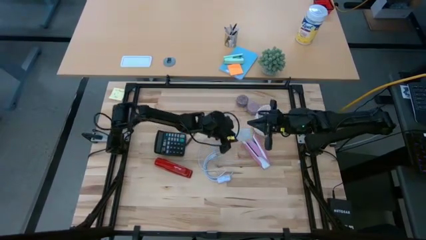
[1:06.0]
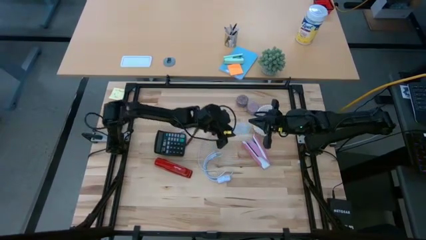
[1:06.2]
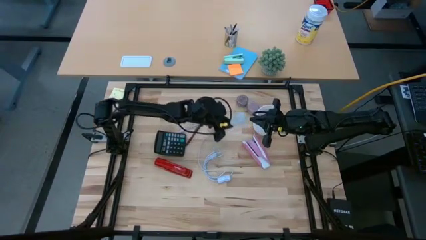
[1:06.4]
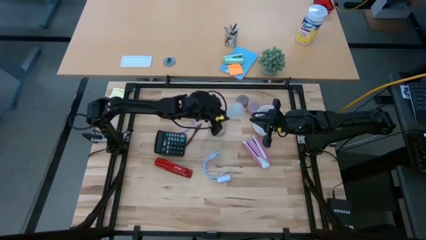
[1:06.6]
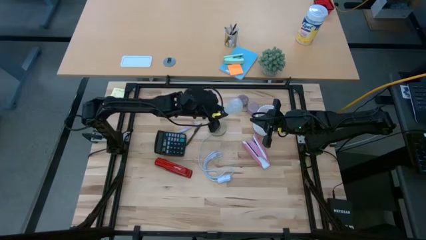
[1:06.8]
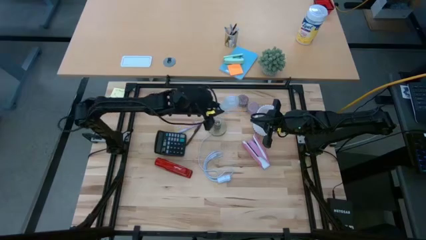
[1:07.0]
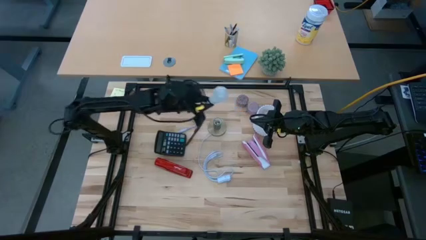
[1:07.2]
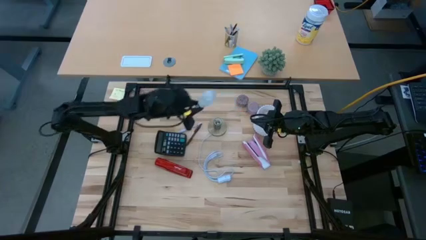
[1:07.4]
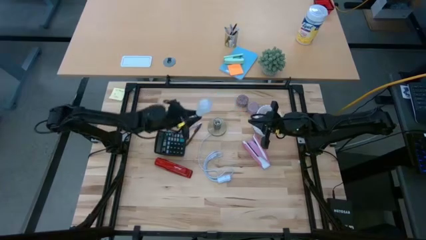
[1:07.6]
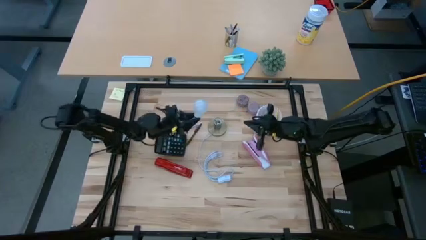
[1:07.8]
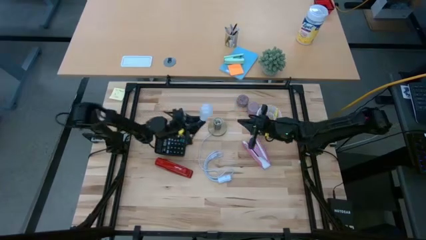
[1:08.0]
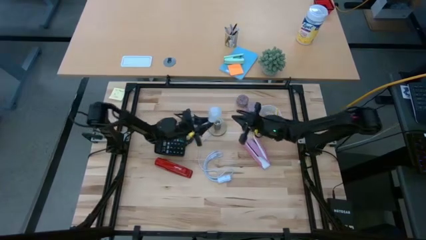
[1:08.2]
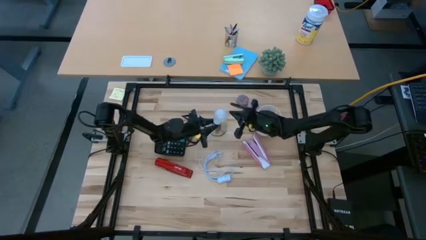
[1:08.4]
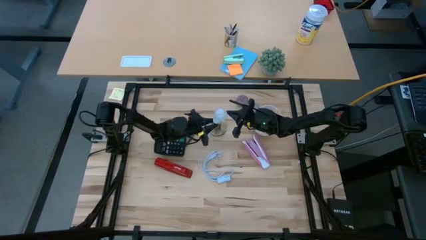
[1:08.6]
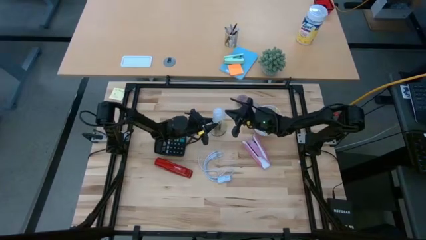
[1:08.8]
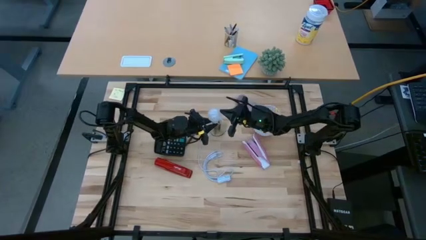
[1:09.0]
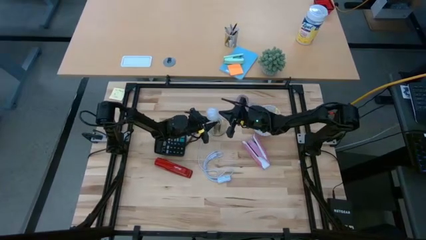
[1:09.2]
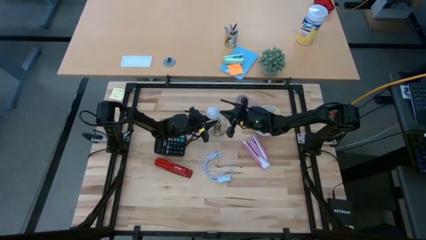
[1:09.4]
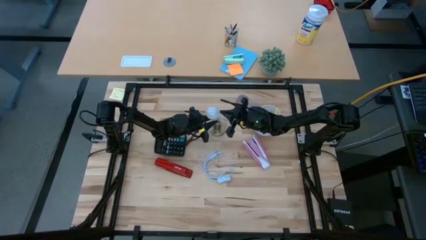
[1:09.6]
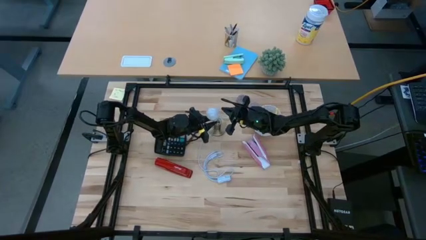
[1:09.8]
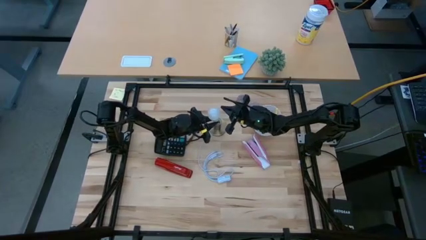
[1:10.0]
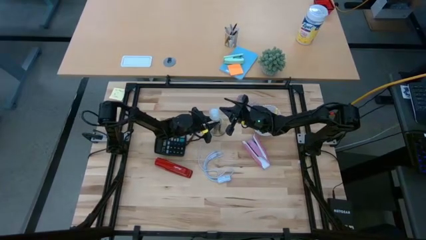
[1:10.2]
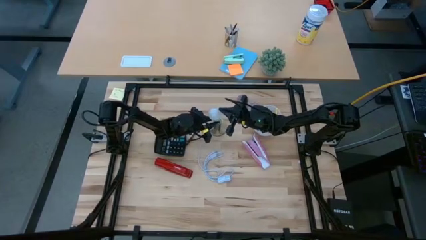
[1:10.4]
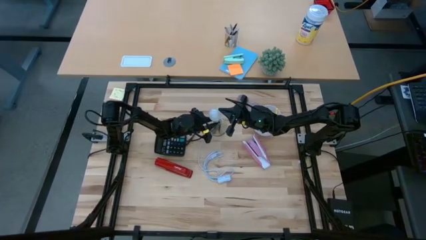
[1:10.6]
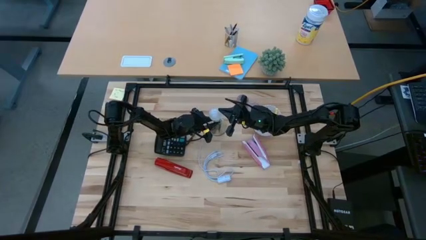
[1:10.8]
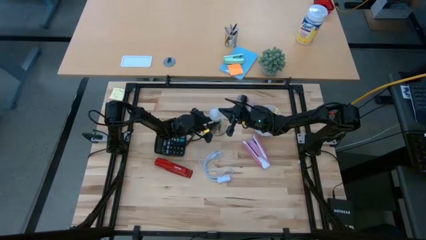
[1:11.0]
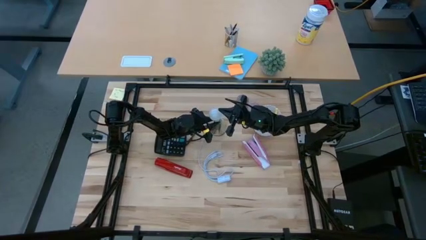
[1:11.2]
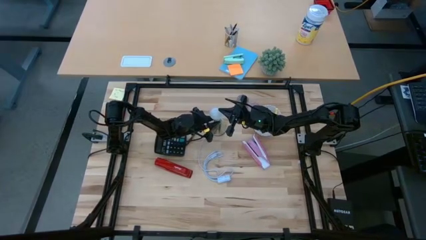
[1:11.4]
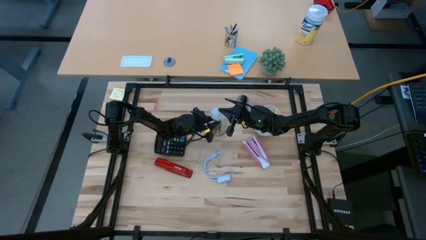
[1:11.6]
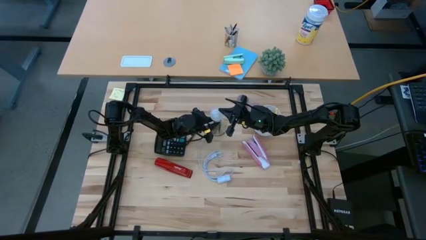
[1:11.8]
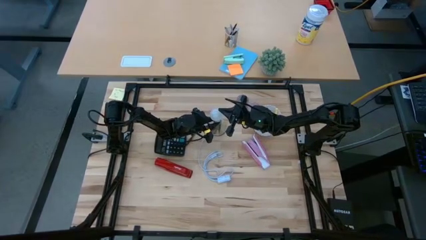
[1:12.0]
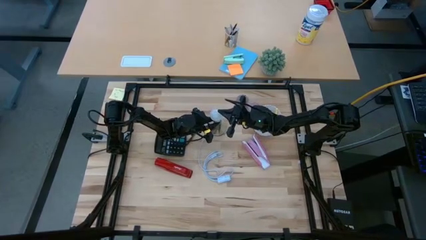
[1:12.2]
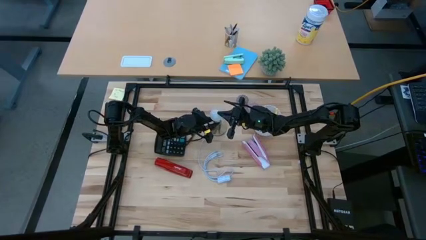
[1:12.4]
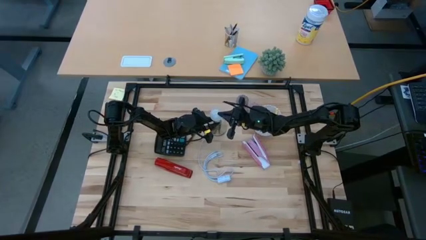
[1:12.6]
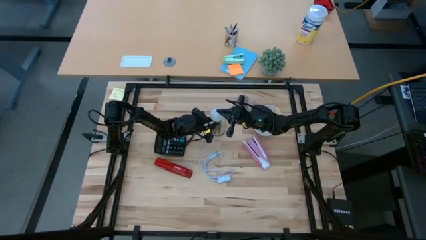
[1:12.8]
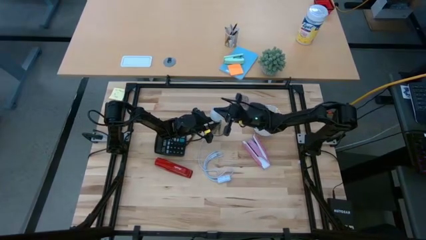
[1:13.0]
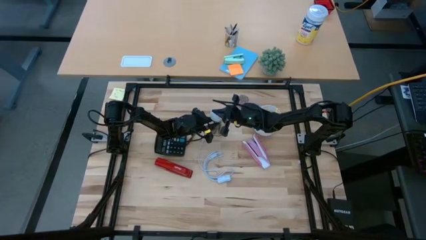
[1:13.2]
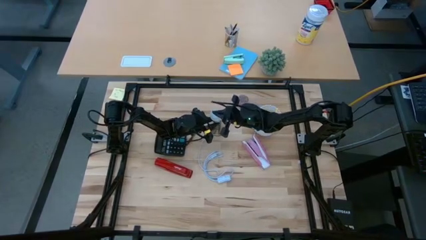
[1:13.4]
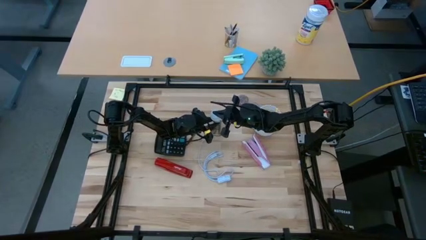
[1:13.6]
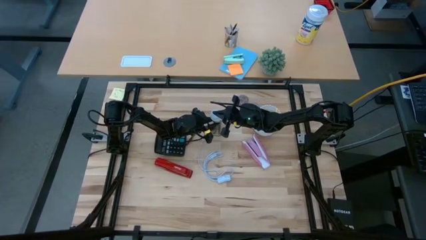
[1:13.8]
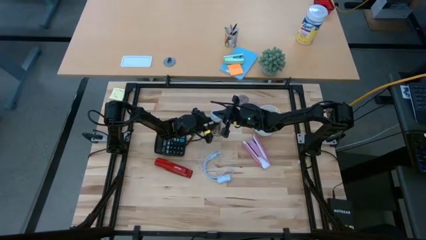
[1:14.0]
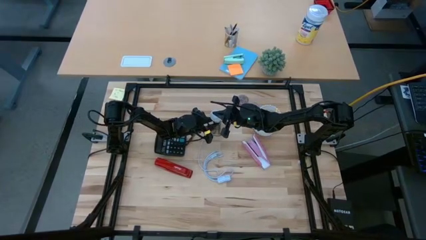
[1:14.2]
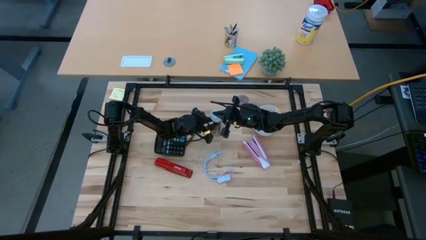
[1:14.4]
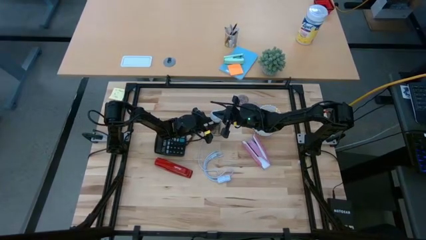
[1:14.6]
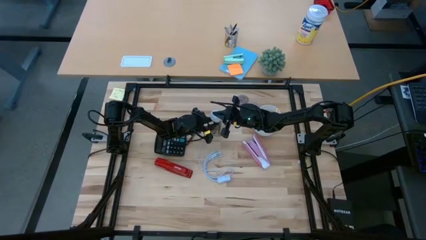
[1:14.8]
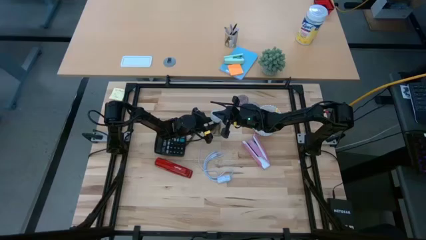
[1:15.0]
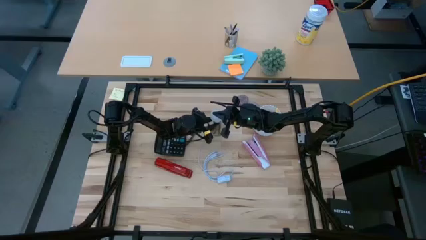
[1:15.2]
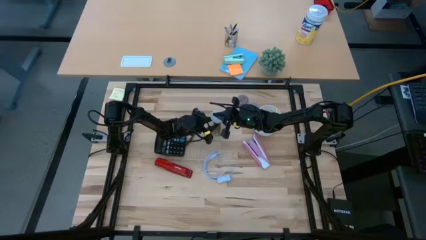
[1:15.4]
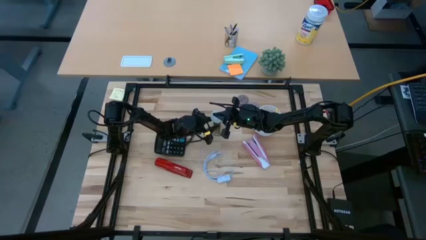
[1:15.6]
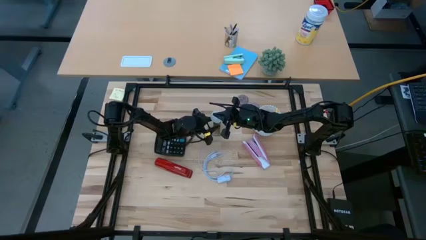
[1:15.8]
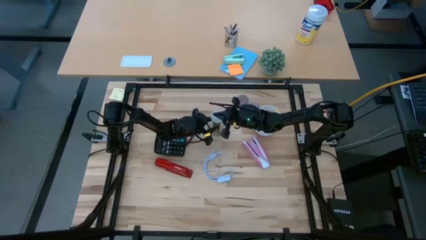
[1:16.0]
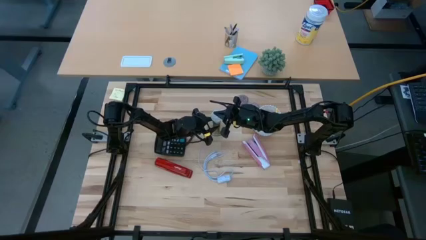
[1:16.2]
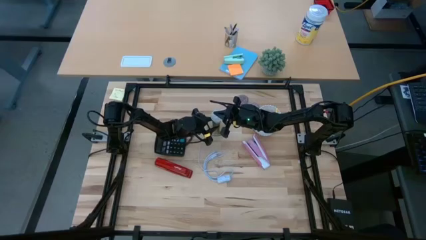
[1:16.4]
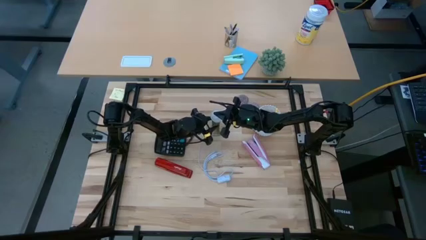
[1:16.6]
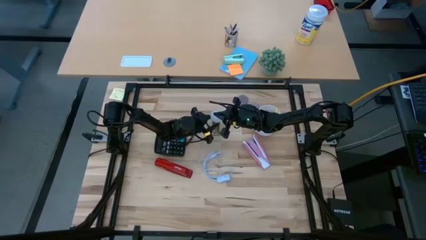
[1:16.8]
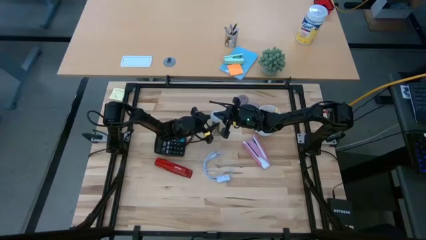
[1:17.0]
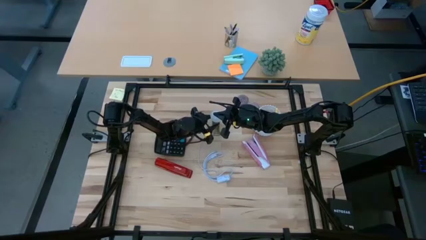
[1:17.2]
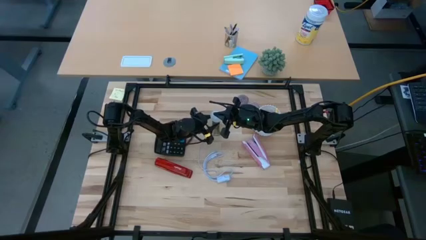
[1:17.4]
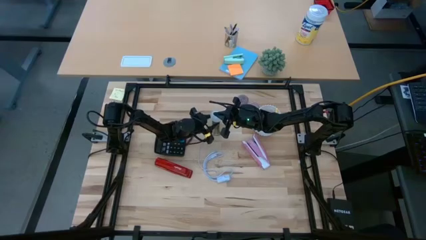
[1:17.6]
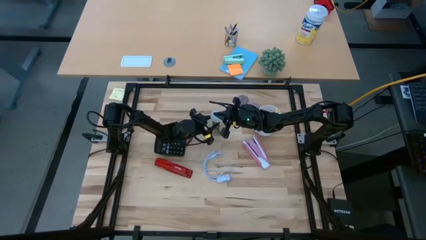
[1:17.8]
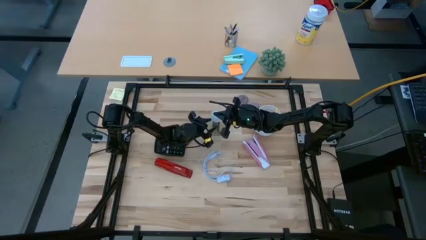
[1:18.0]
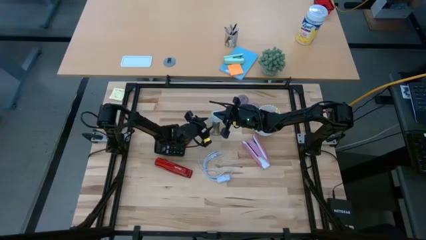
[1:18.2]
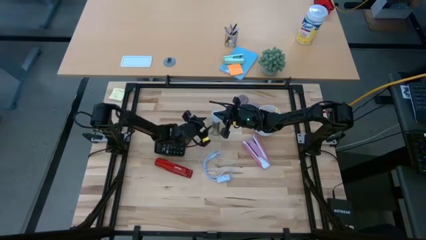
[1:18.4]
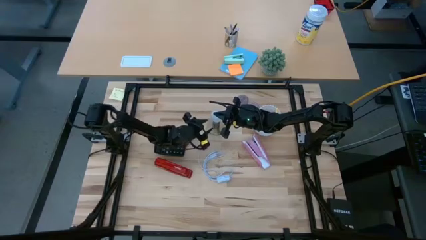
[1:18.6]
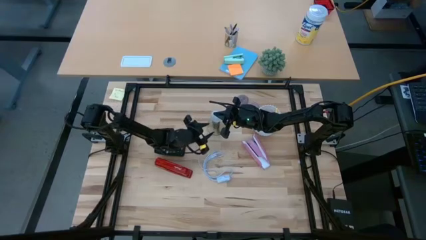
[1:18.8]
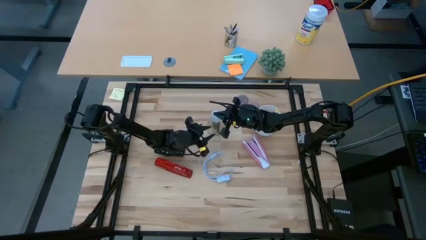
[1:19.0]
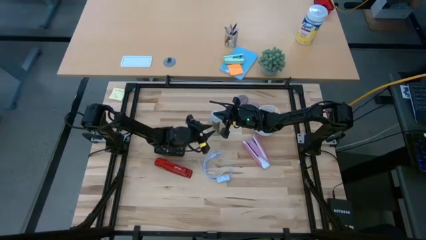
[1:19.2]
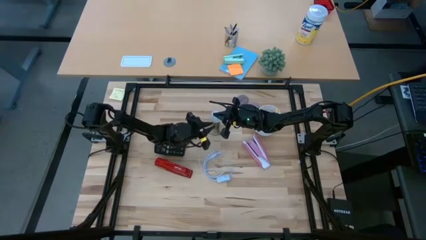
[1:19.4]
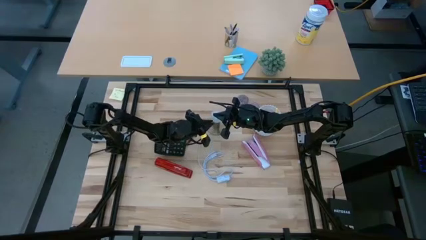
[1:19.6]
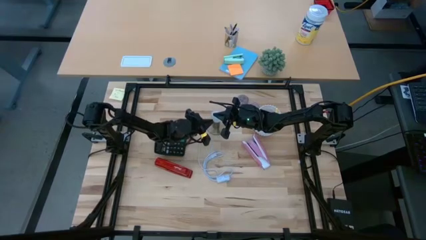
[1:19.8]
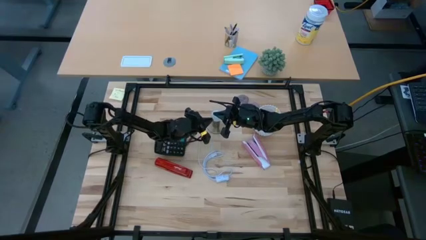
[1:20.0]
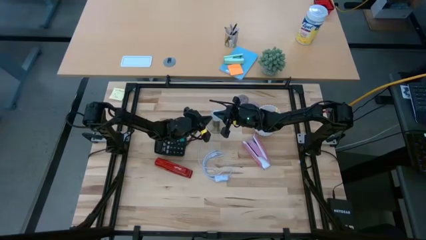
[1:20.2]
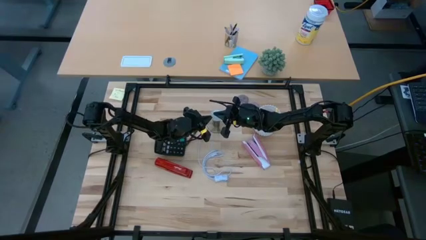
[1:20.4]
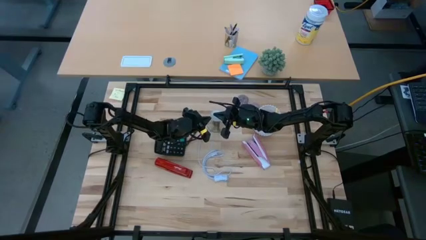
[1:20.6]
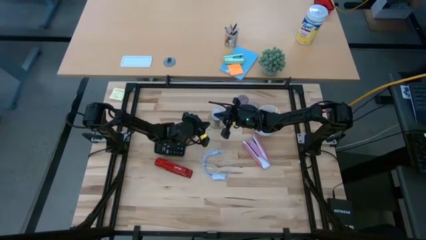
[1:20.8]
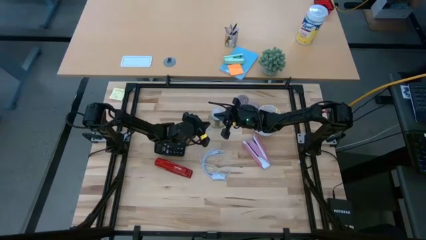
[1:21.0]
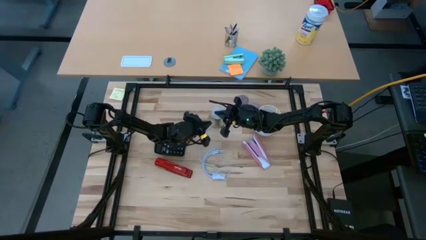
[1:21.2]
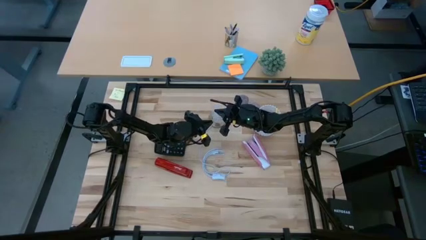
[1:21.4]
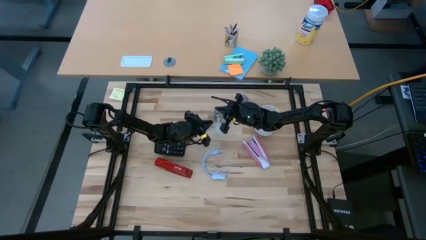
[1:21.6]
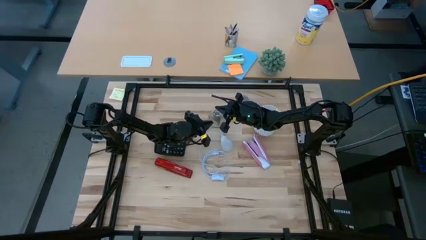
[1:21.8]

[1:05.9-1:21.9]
Task: Screw lightbulb
Insert the white lightbulb into the golden lamp
